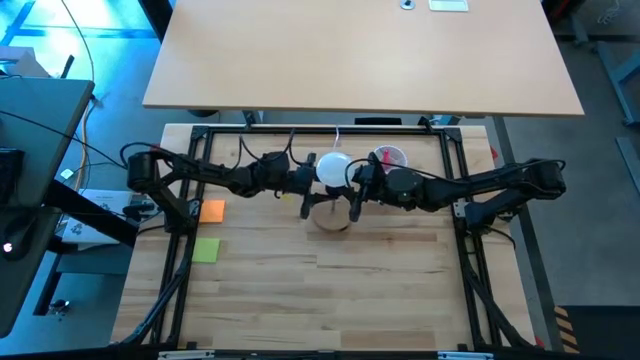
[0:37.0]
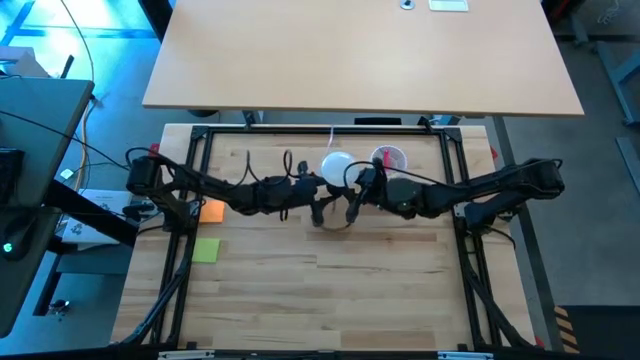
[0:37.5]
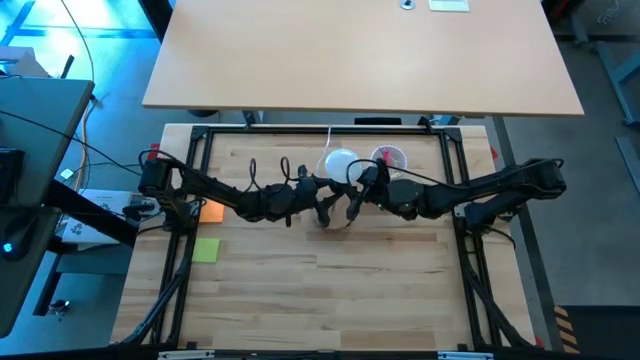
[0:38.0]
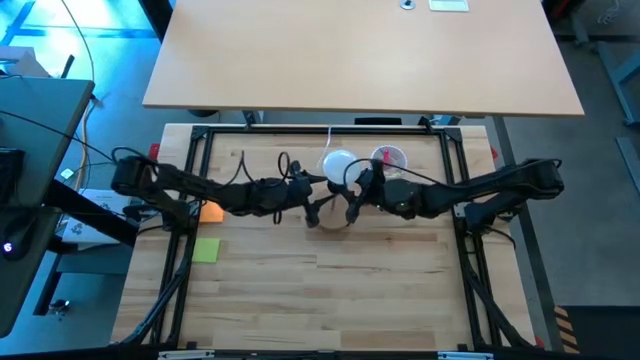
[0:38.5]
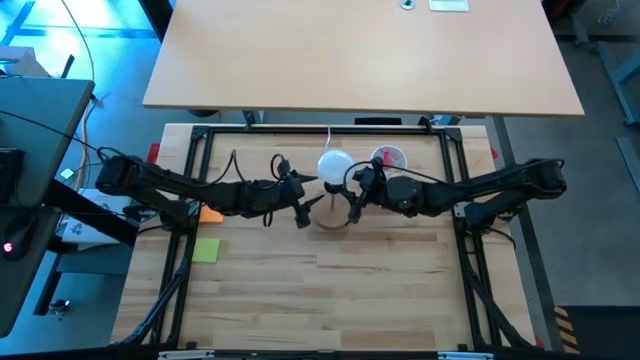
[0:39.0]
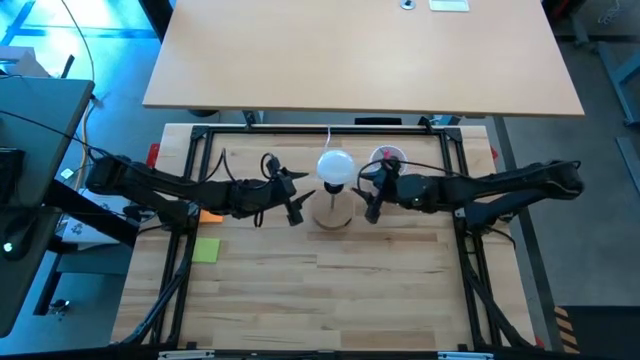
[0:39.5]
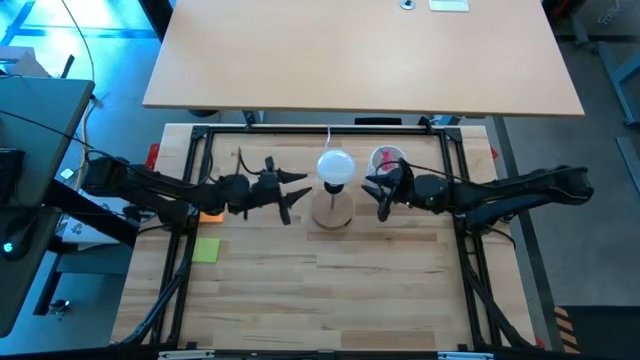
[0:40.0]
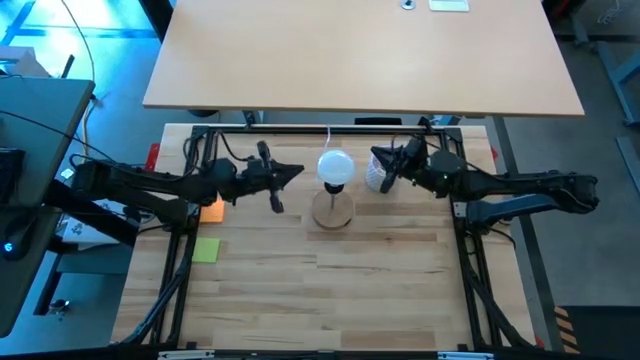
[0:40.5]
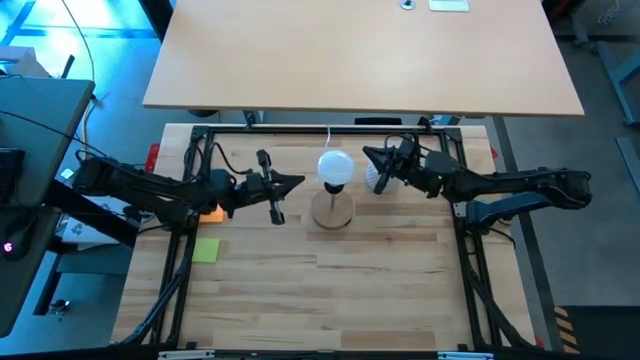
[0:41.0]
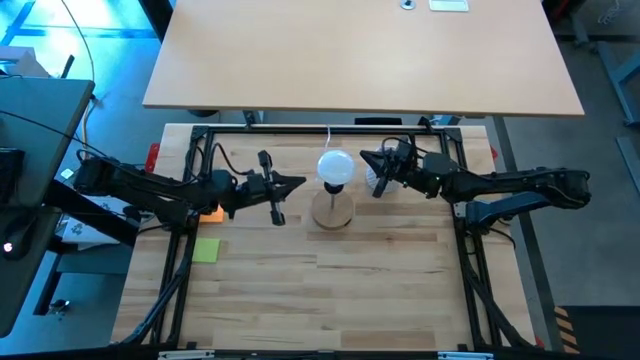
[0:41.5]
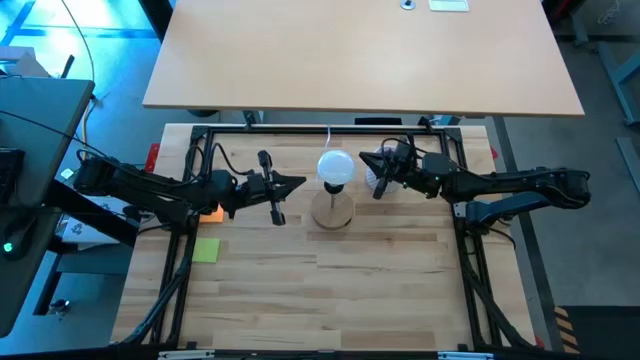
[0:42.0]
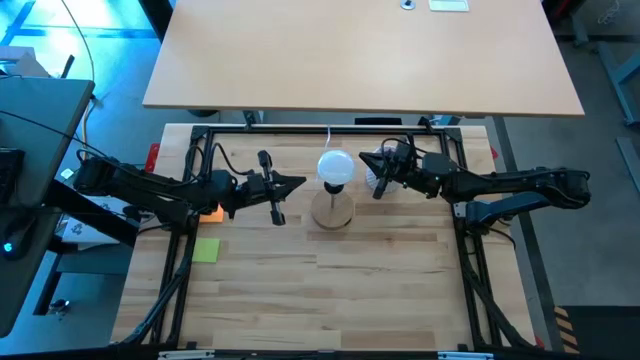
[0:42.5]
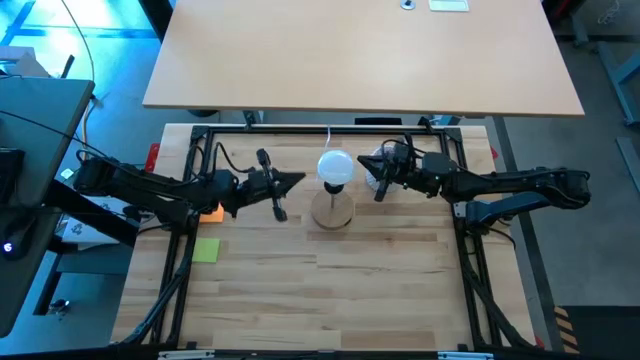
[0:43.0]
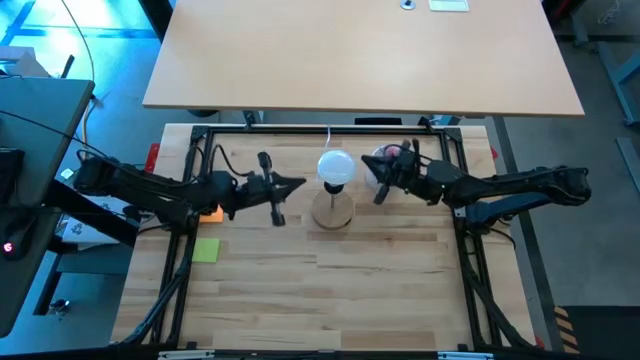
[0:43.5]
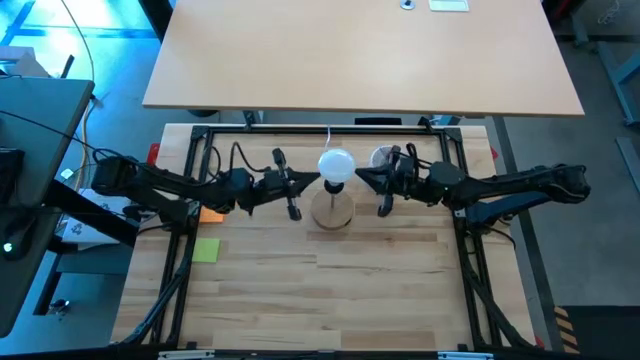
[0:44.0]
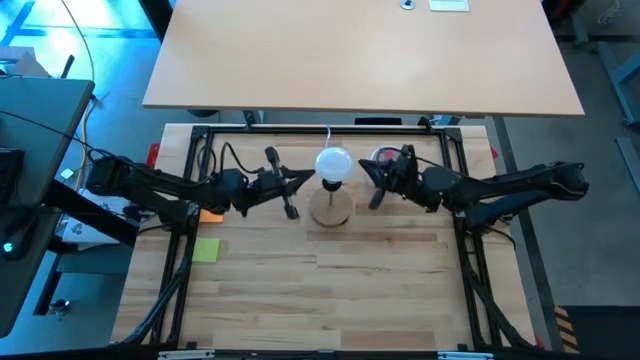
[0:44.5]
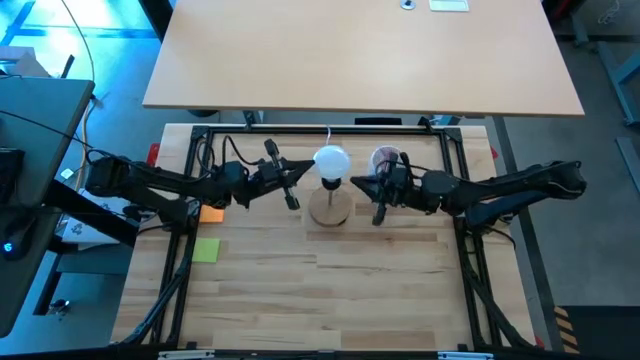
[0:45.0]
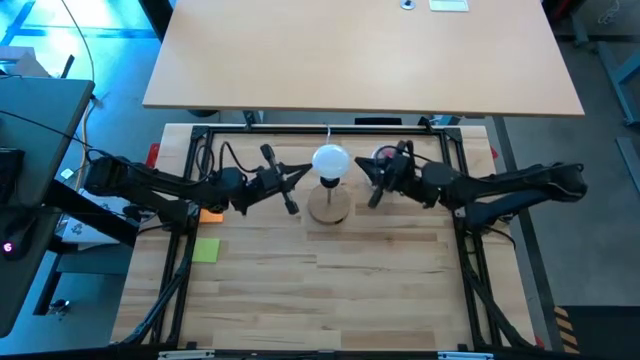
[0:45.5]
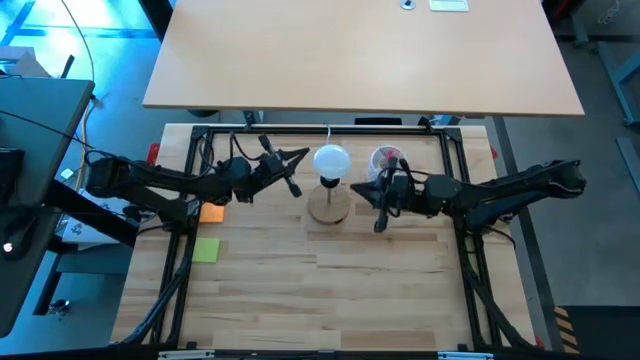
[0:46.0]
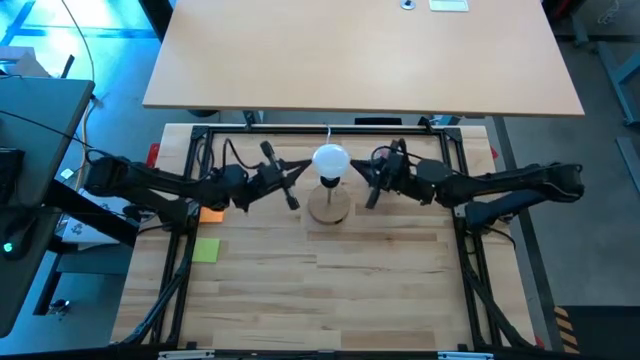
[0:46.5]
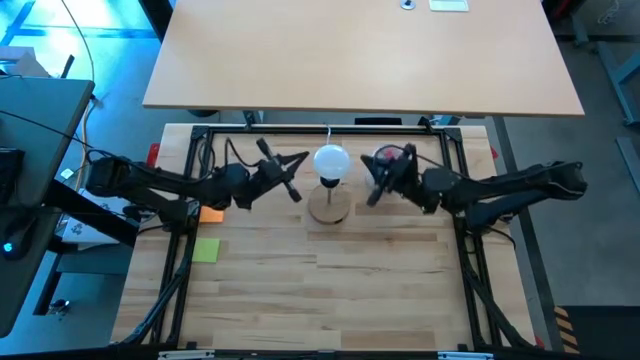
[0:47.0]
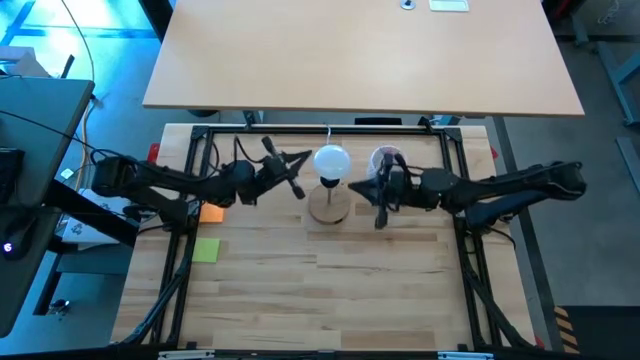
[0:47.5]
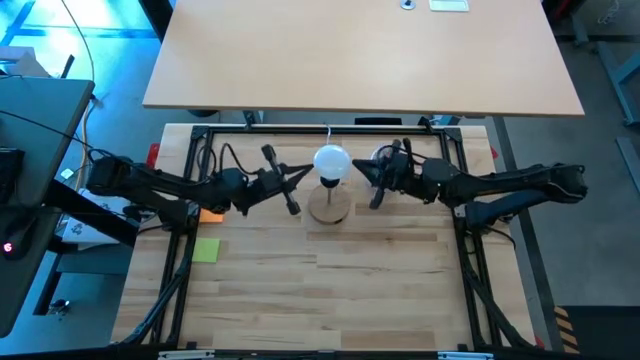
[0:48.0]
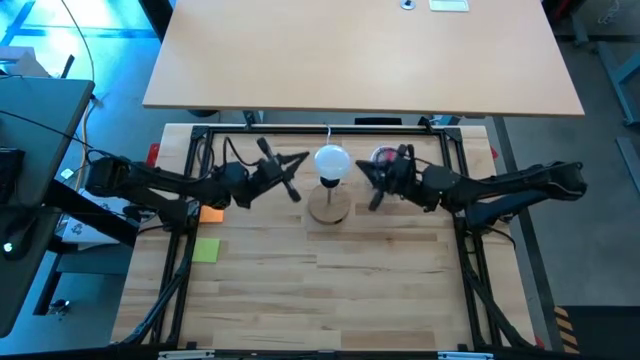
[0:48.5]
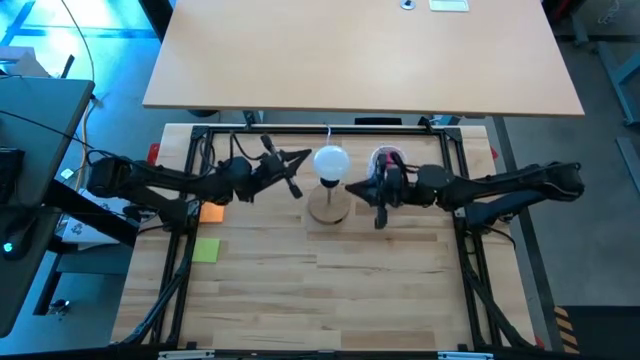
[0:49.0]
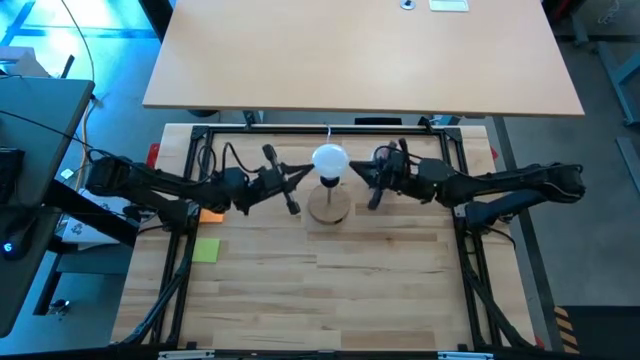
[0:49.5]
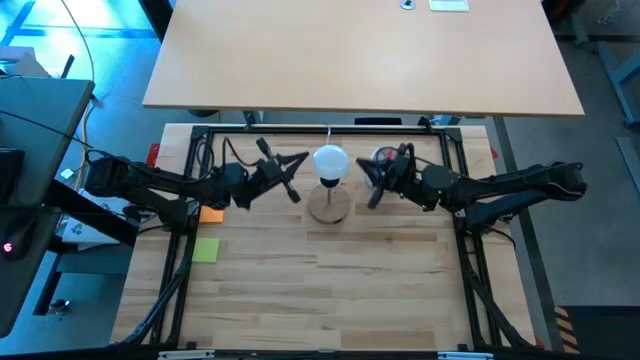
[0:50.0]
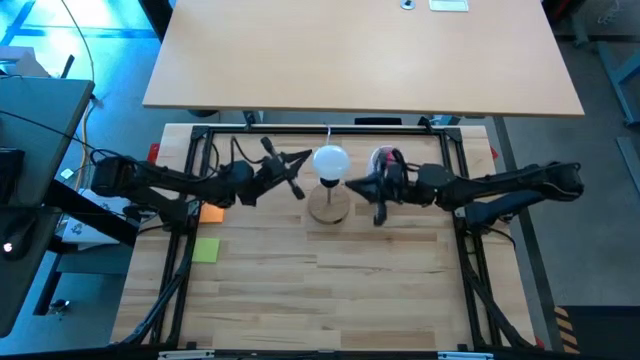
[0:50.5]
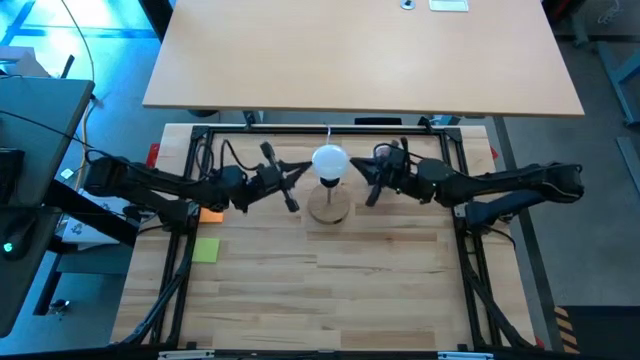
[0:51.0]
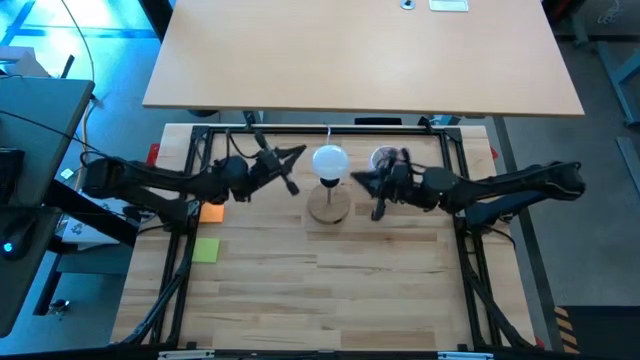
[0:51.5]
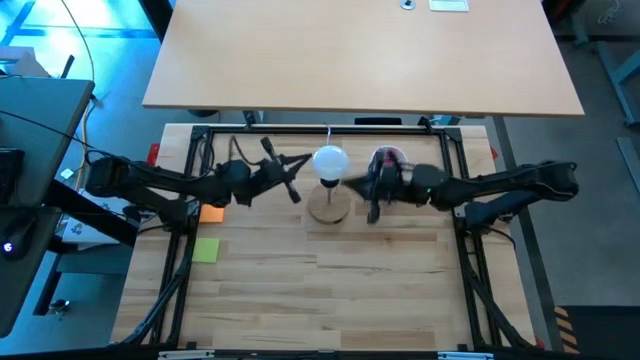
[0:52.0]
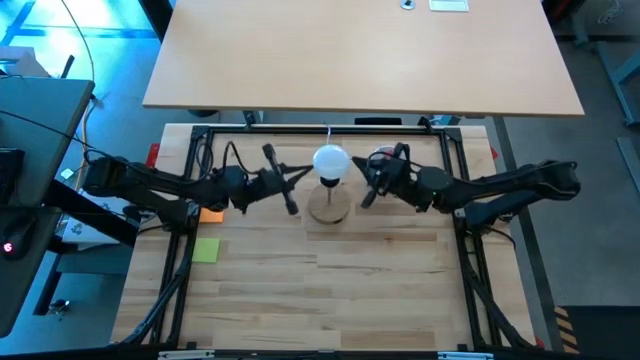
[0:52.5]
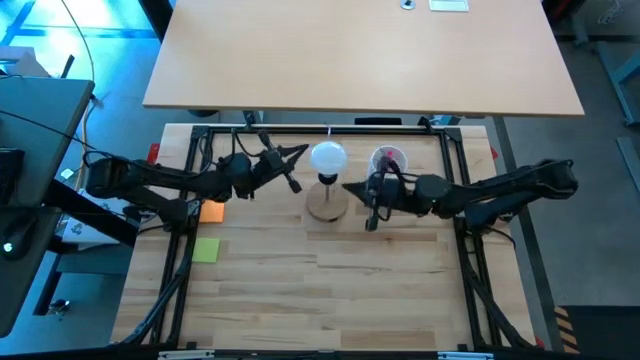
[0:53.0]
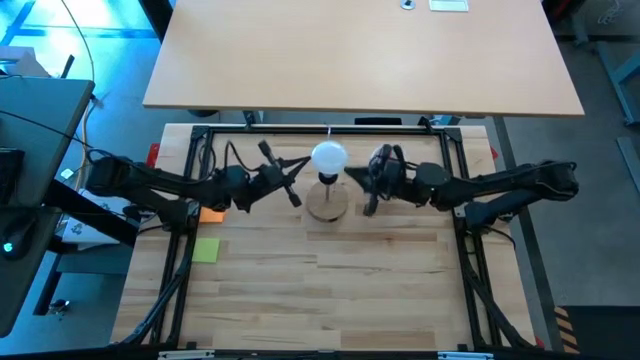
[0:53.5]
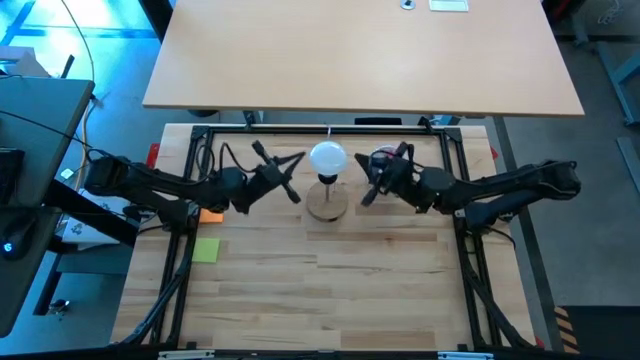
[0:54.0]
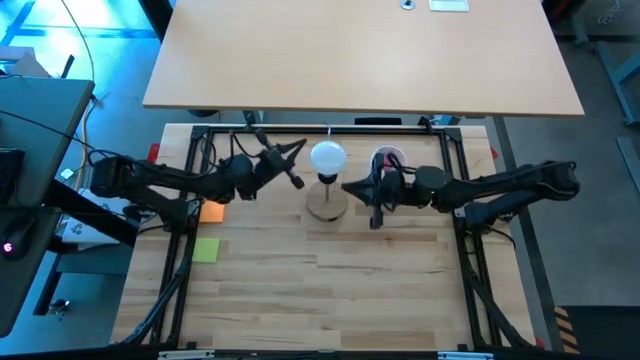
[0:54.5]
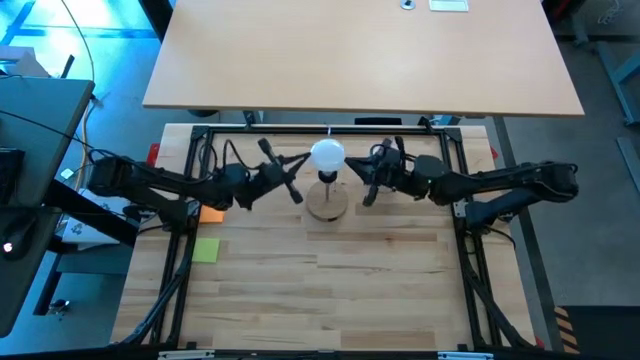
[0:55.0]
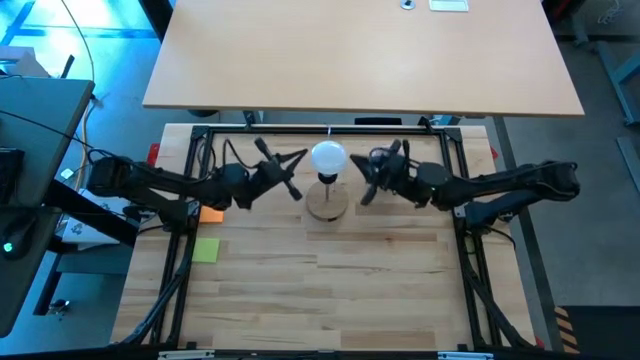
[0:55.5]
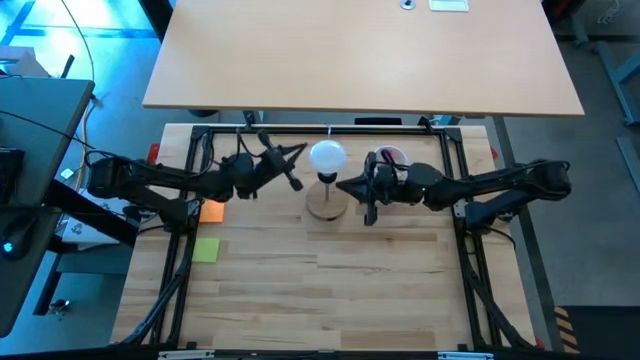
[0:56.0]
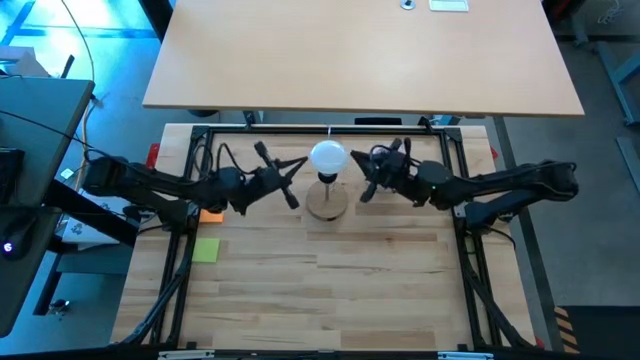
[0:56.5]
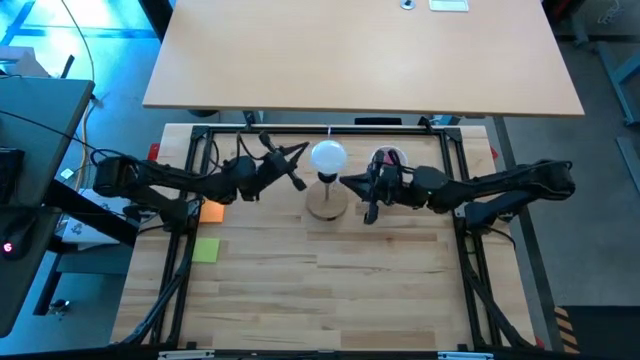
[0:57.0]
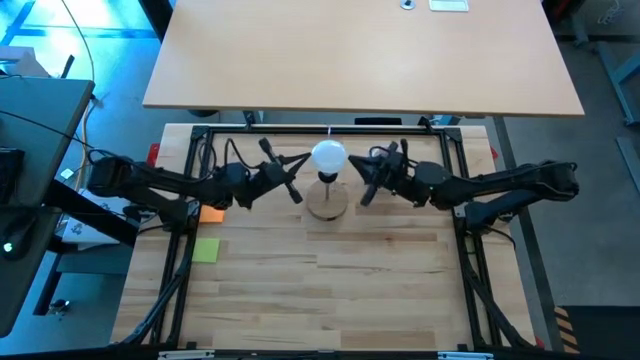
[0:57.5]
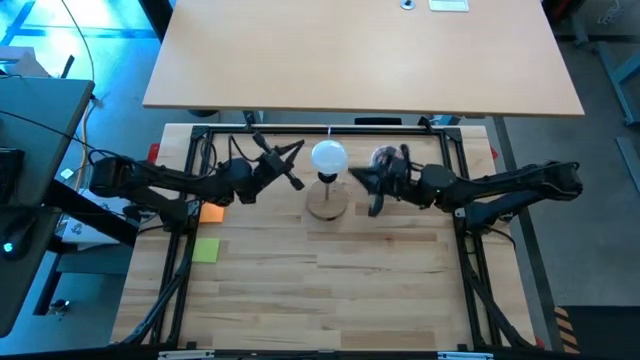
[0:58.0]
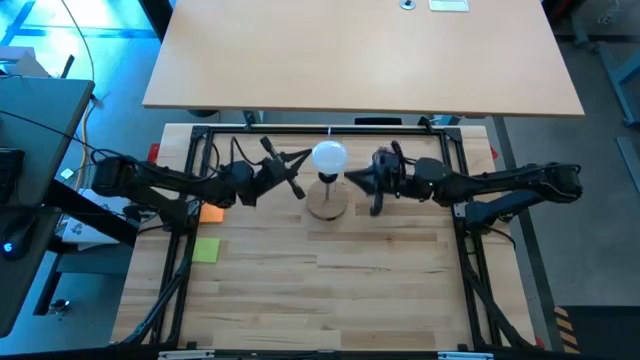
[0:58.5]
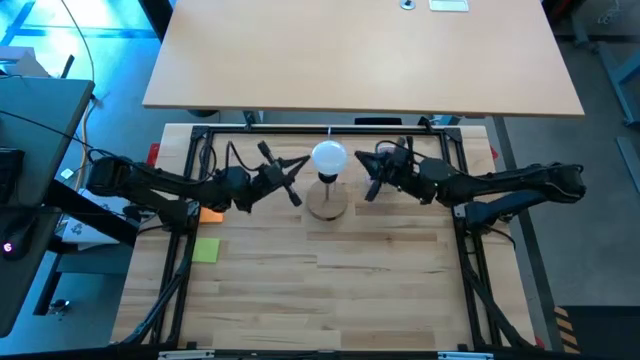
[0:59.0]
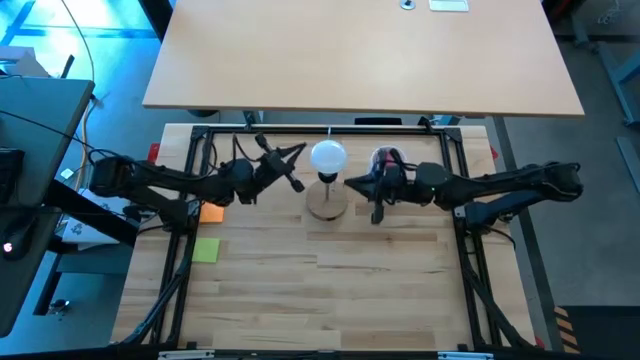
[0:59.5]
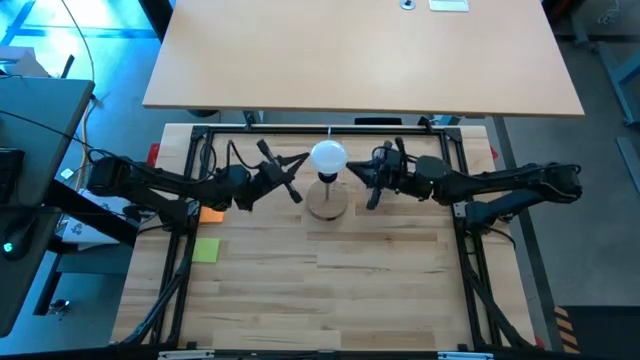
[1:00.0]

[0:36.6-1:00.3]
Task: Screw lightbulb
Insert the white lightbulb into the brown lamp
